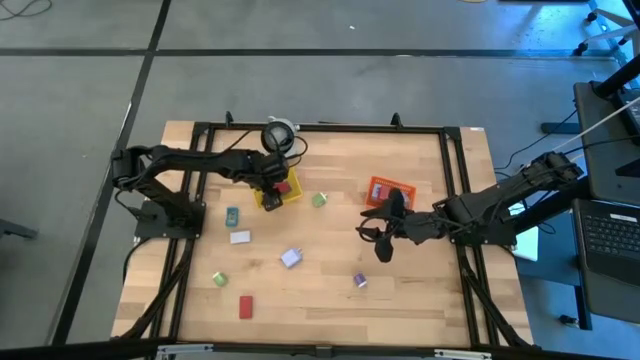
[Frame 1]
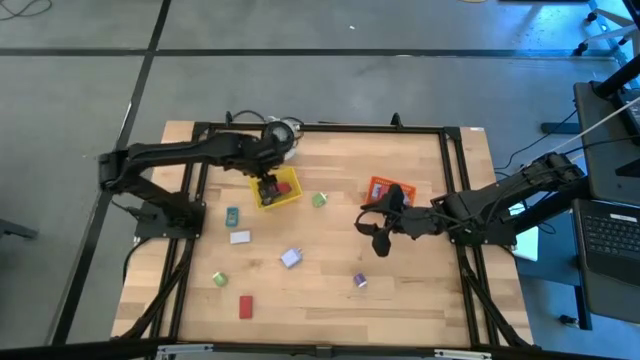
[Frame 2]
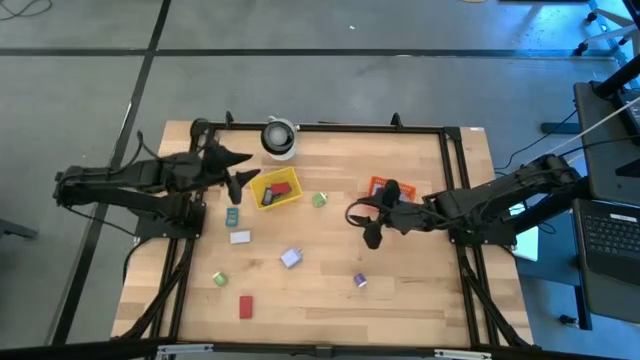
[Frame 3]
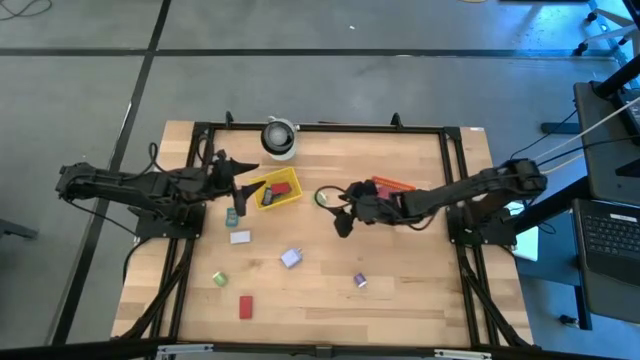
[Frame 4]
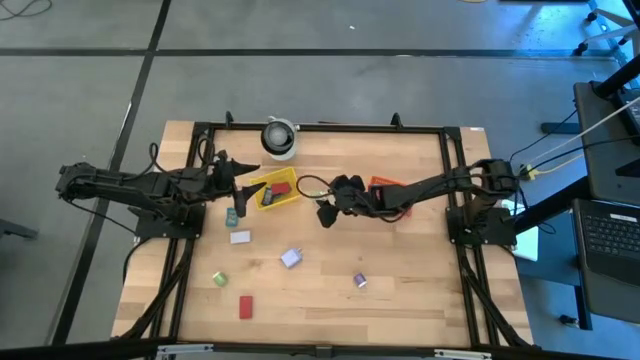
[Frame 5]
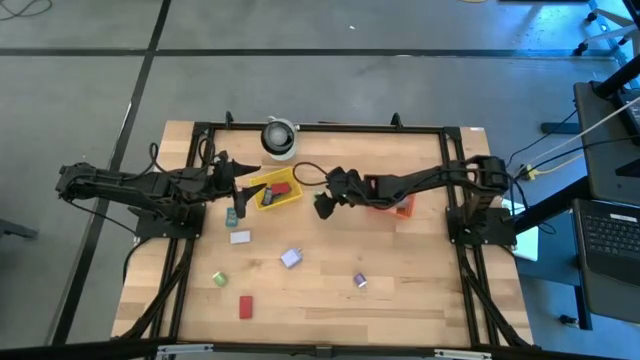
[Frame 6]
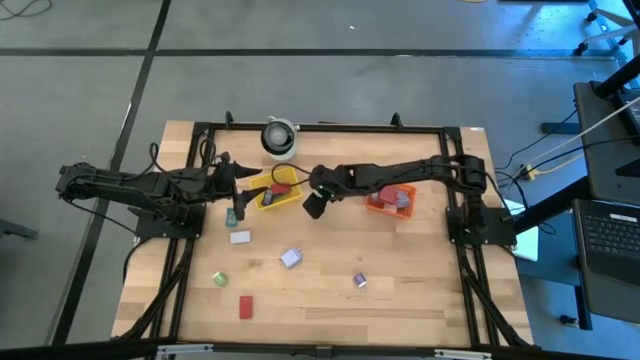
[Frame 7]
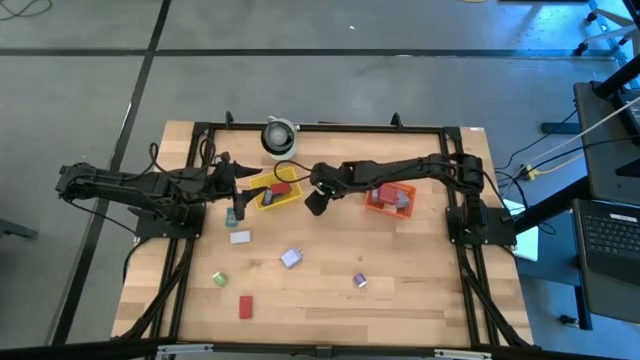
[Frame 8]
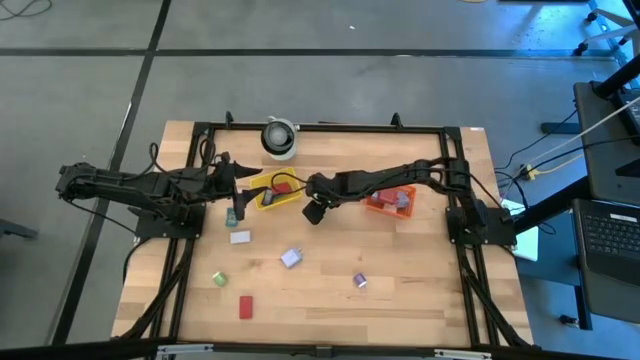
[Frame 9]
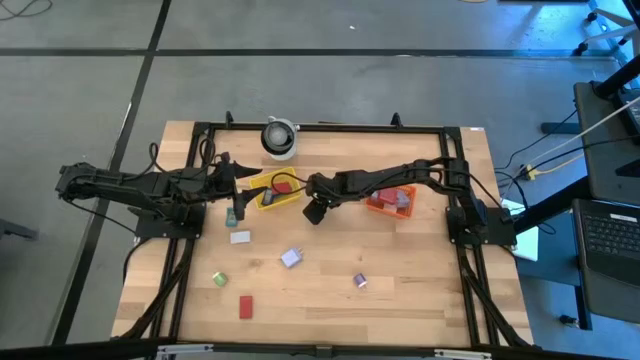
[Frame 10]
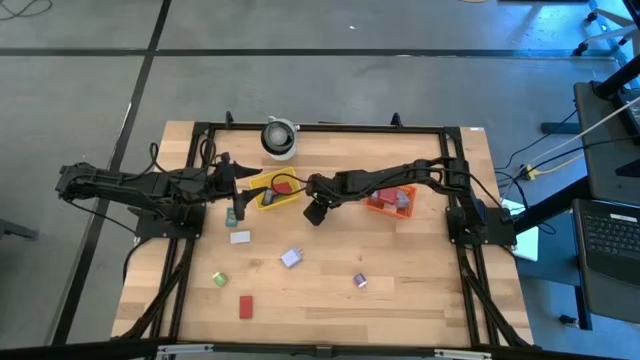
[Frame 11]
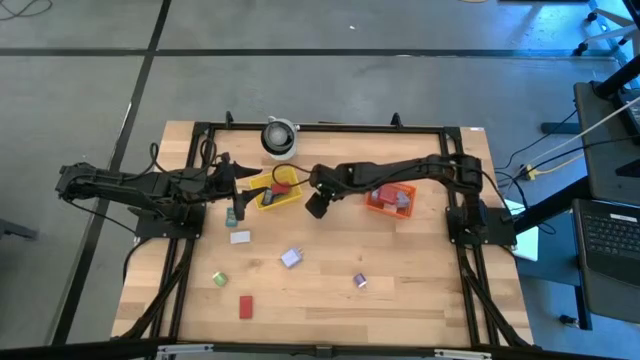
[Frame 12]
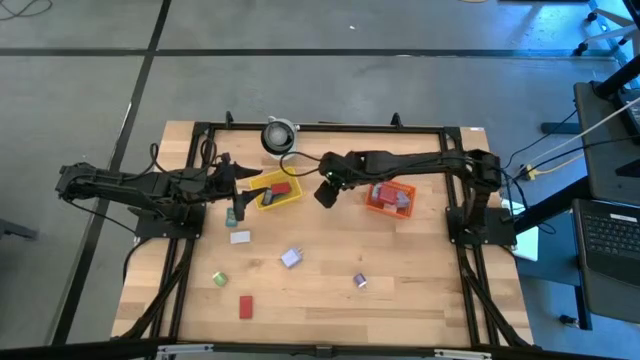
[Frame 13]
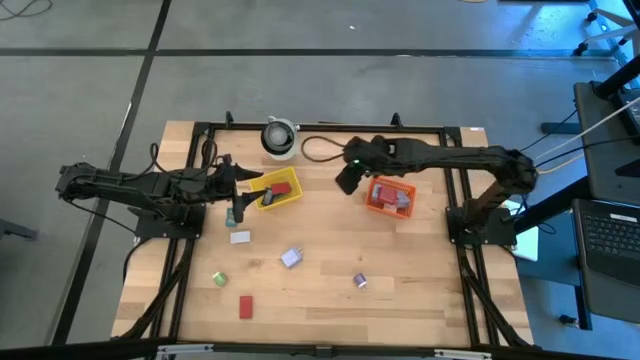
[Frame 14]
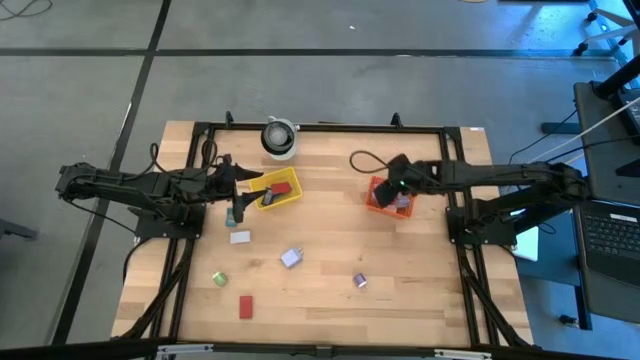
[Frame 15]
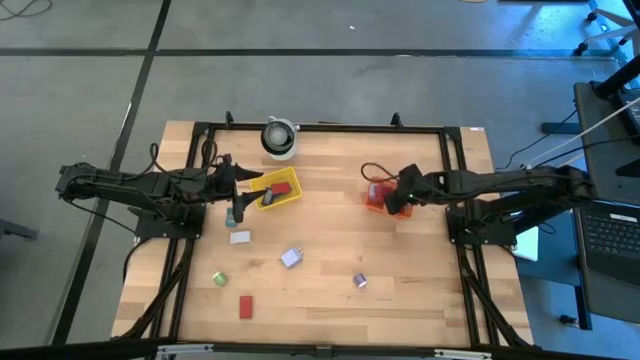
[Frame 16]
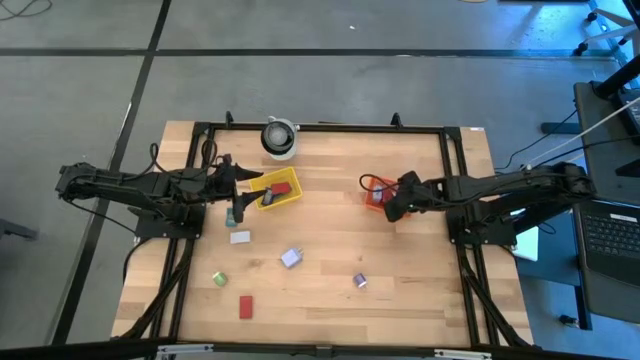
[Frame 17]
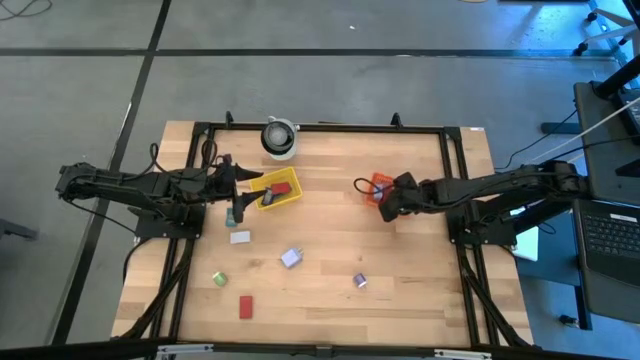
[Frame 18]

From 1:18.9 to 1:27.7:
Task: Pick & Place Office items
Put the top green charger adapter into the orange bin

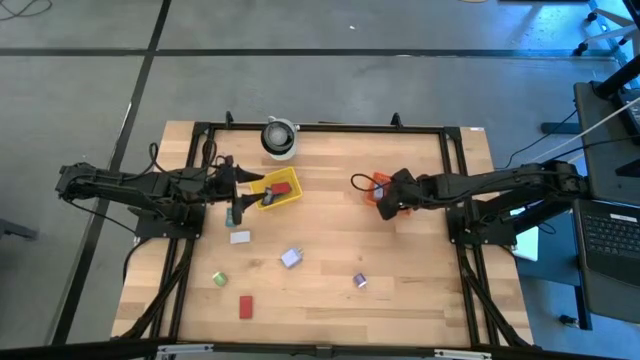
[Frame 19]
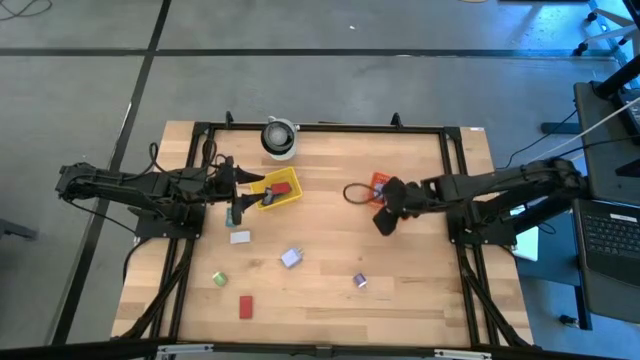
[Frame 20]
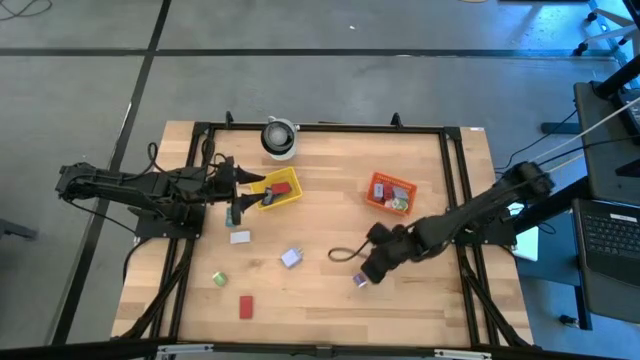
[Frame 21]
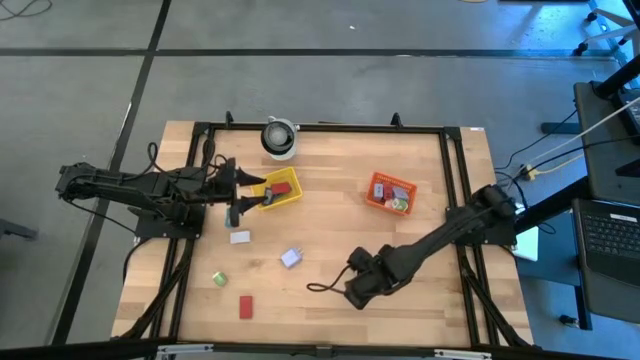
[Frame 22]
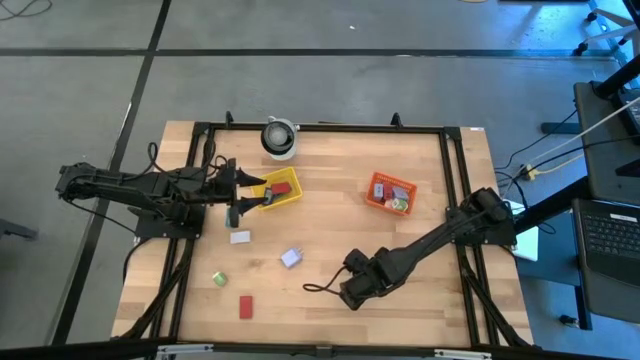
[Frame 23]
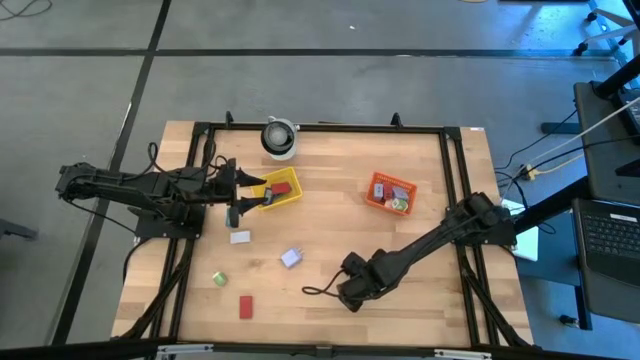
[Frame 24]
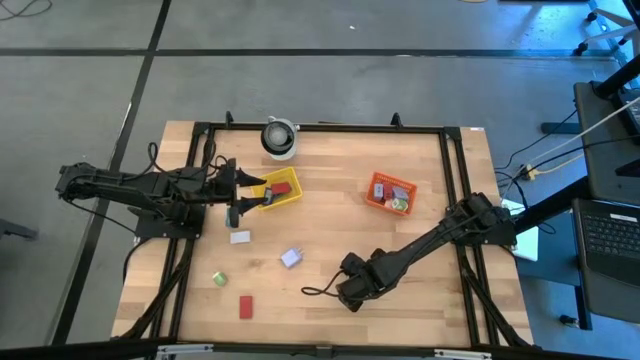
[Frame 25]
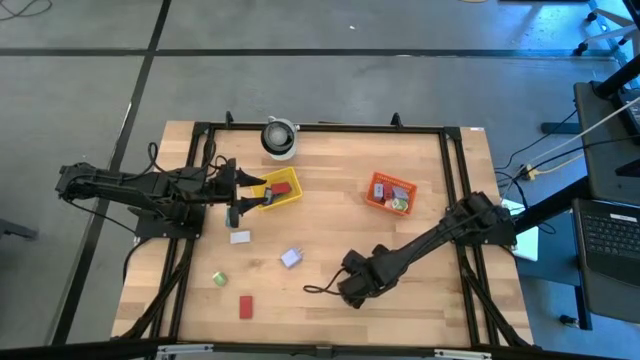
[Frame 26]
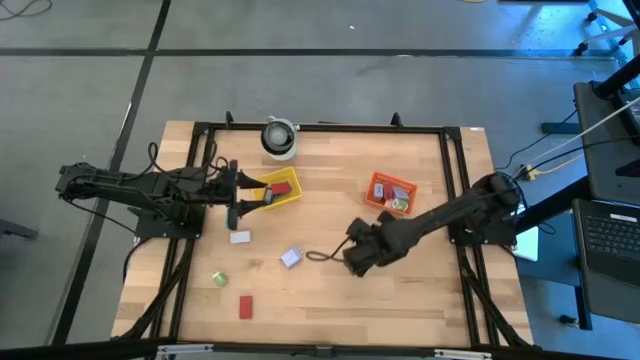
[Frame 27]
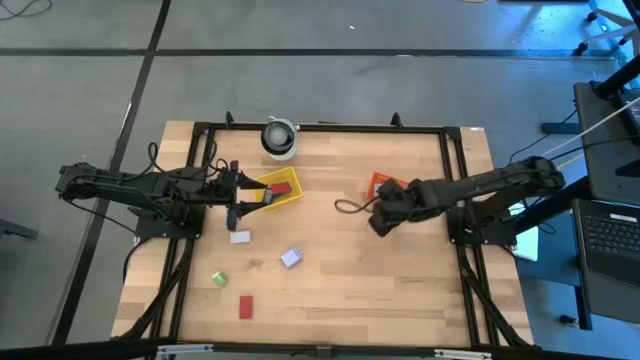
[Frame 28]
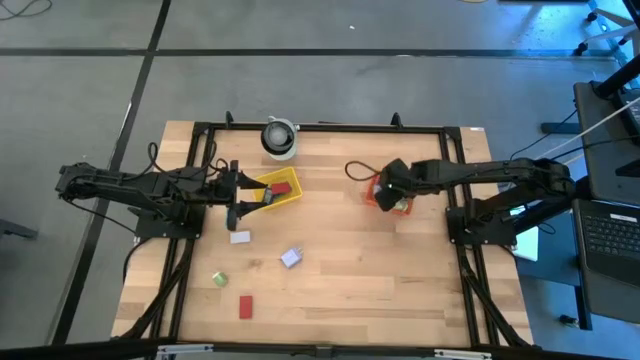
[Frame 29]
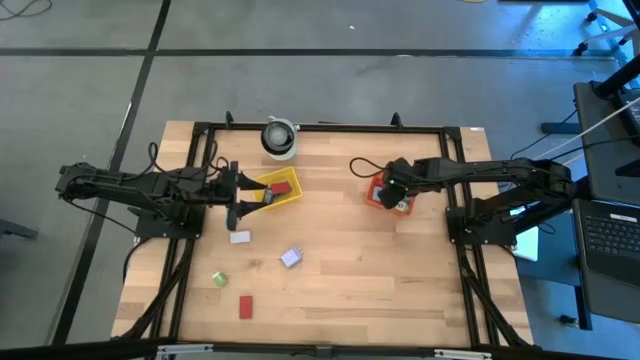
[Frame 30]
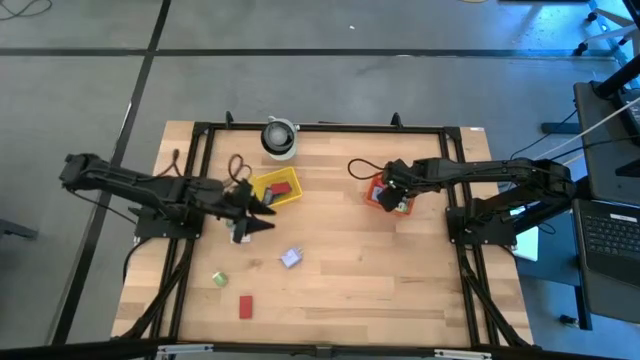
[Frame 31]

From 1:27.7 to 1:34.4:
Put the violet charger adapter into the orange bin
